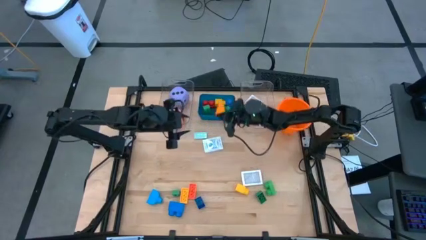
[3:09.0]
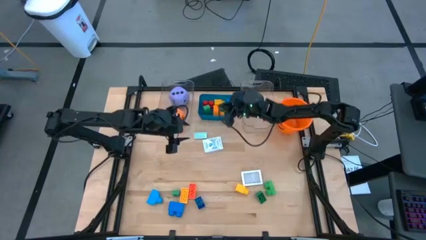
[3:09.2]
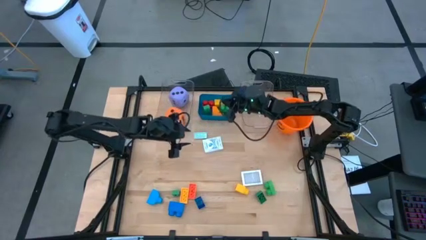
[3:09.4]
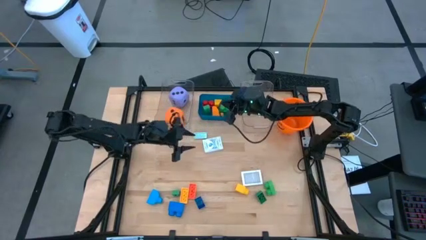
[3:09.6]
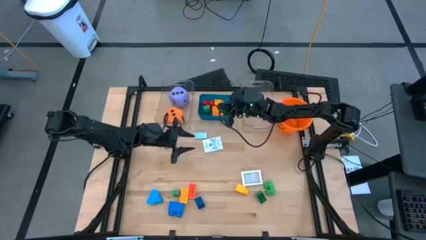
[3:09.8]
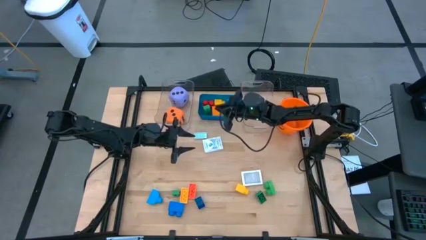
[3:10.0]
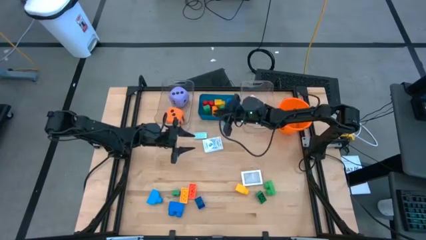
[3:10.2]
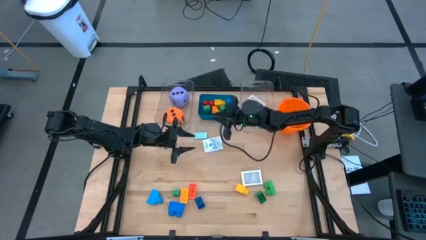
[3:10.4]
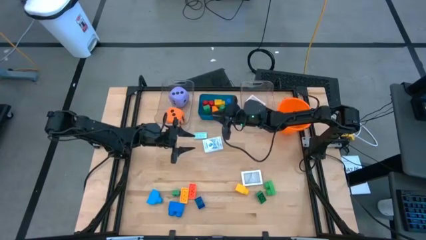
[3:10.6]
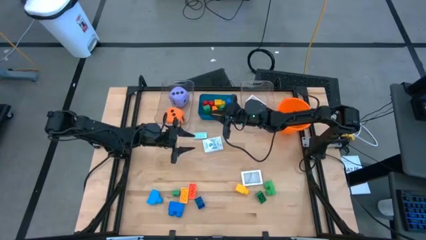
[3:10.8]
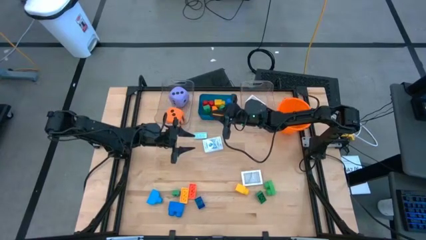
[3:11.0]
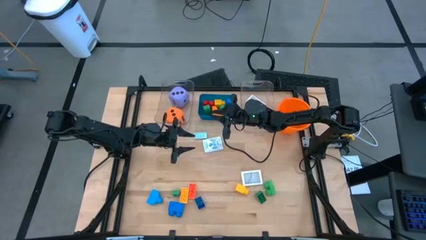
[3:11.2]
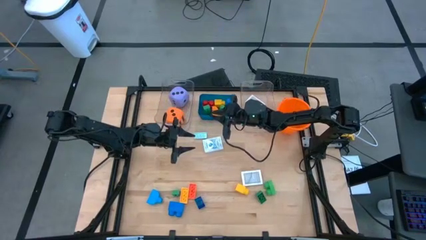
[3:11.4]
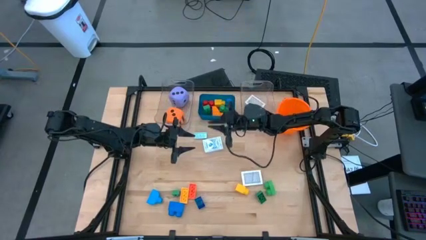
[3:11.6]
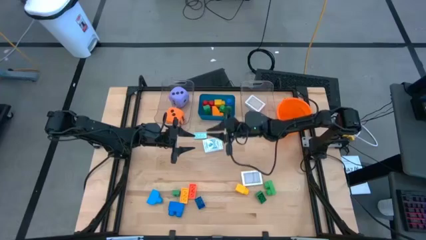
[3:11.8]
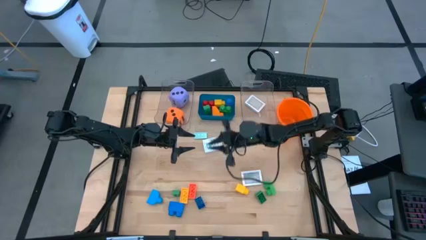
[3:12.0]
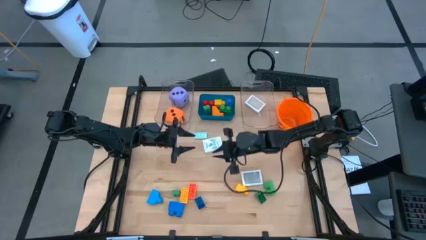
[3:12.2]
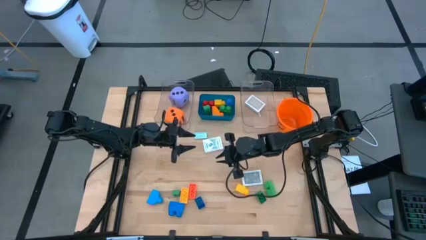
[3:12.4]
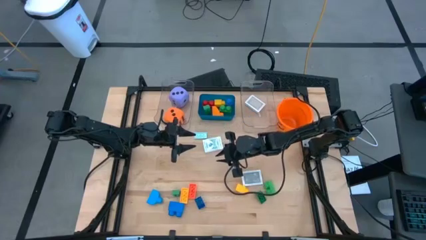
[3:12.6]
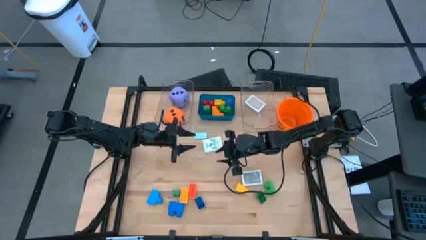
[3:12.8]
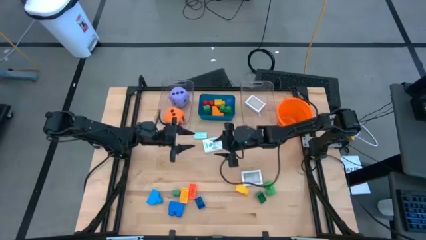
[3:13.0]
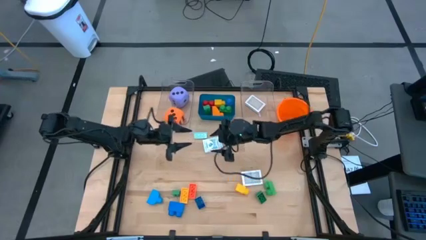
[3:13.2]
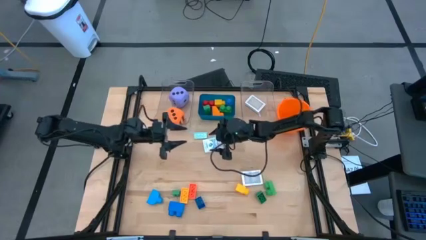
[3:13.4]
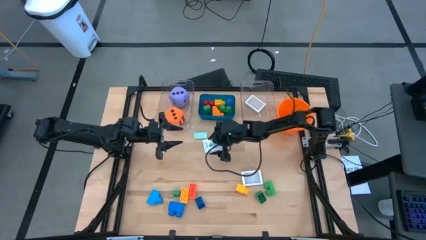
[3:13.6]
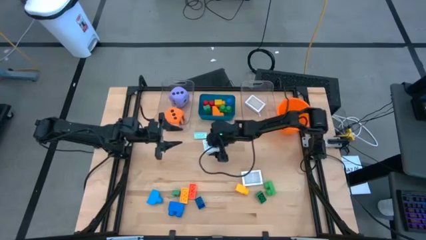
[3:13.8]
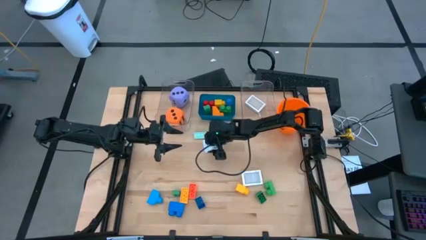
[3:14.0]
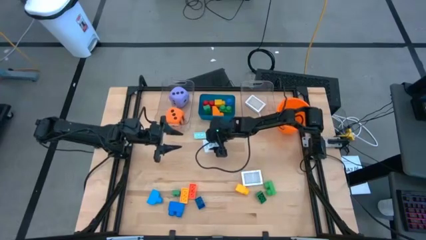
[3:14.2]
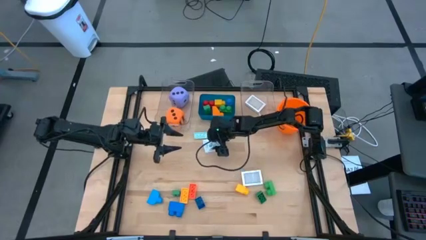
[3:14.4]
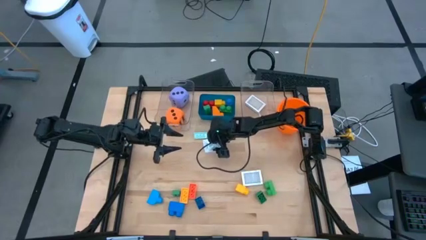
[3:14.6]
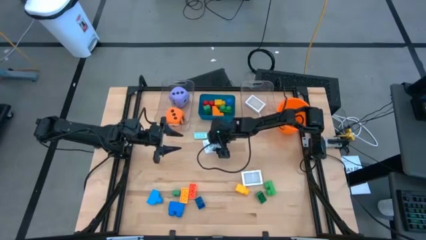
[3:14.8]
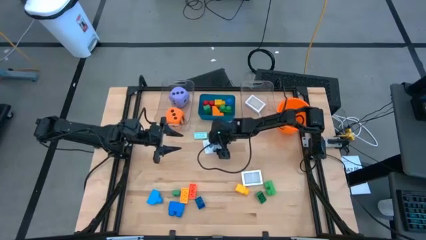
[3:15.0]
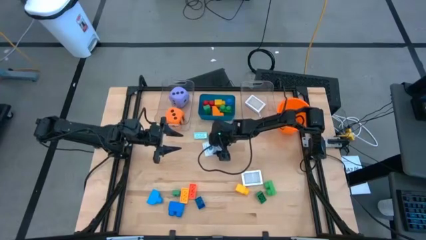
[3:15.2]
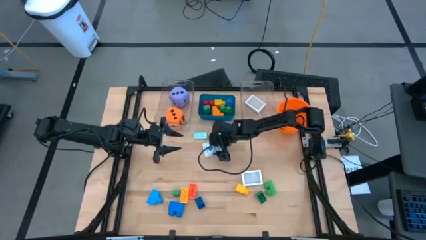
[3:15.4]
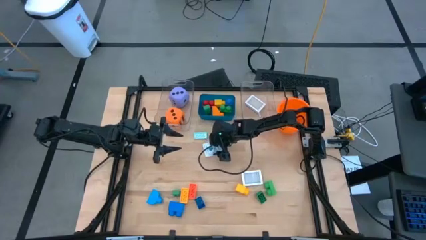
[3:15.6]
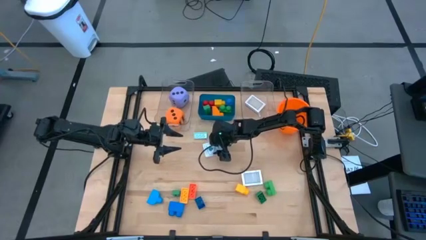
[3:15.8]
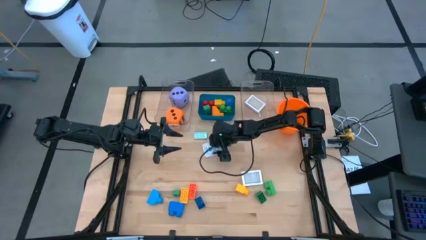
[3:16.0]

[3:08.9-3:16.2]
Task: Pick & Place Toys
Put the blue deck of cards into the right transparent bin

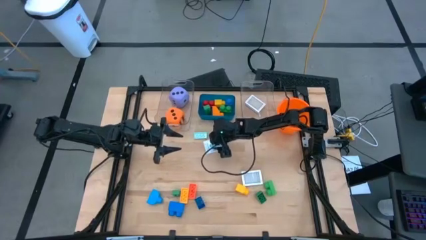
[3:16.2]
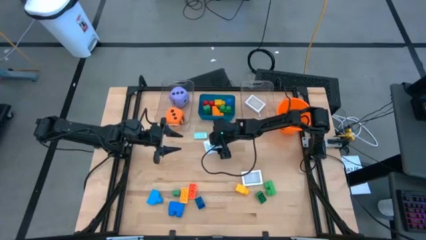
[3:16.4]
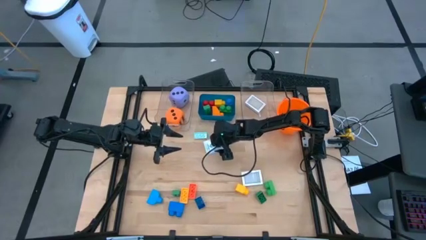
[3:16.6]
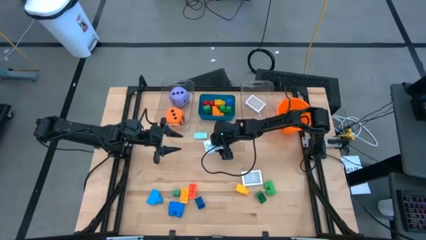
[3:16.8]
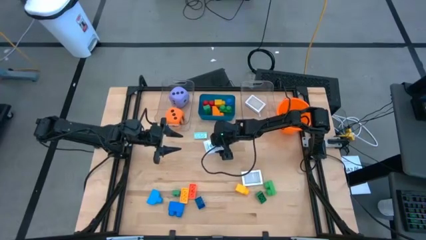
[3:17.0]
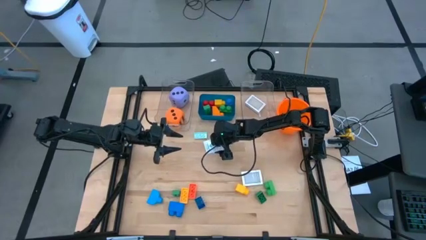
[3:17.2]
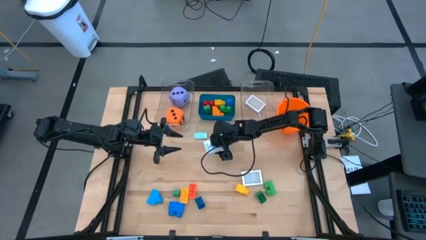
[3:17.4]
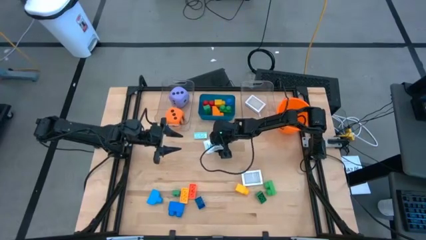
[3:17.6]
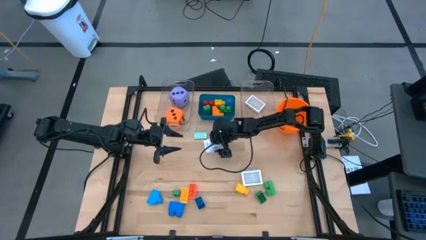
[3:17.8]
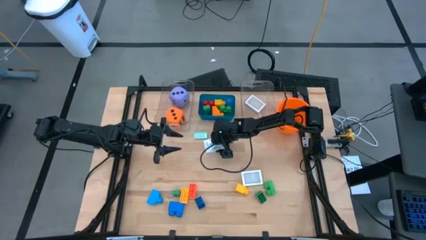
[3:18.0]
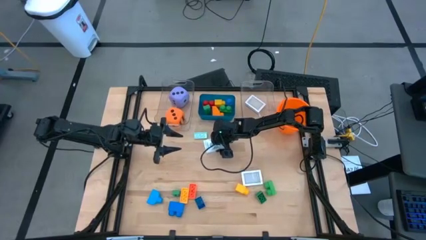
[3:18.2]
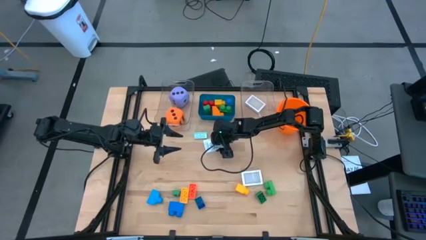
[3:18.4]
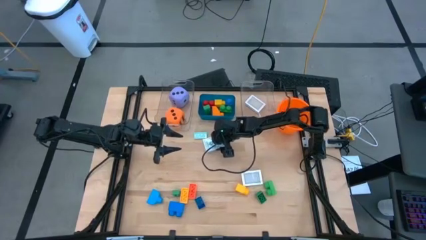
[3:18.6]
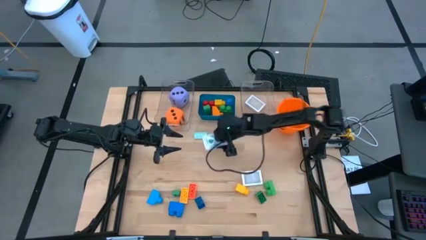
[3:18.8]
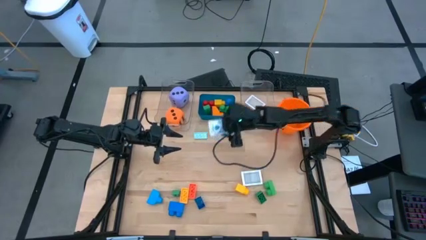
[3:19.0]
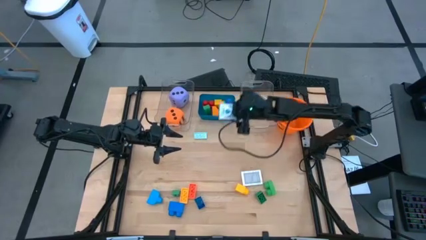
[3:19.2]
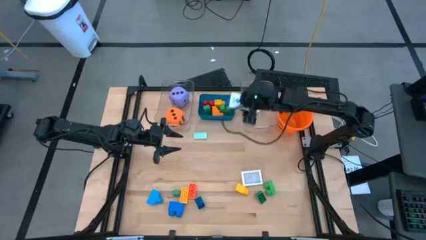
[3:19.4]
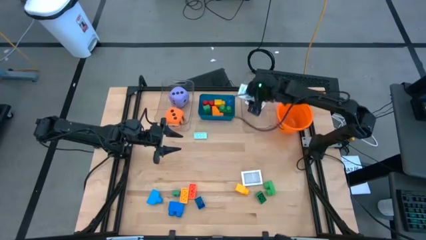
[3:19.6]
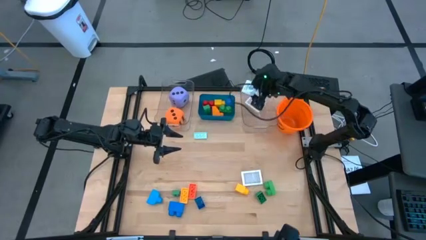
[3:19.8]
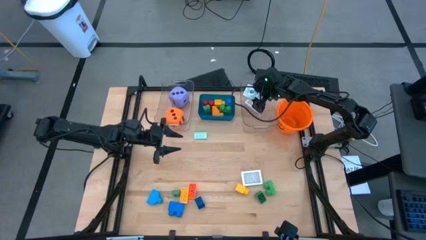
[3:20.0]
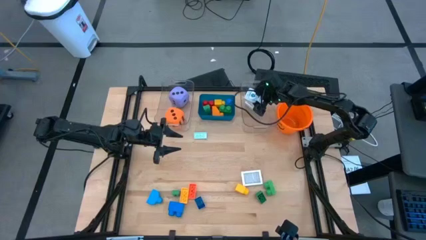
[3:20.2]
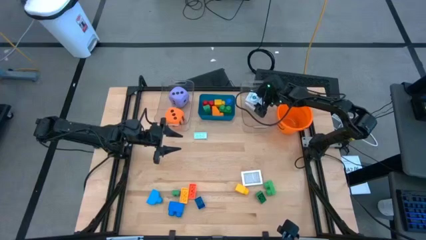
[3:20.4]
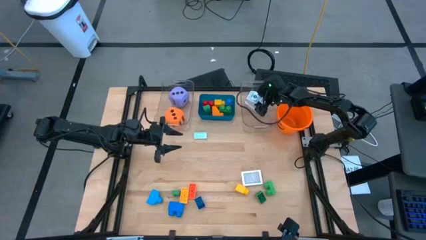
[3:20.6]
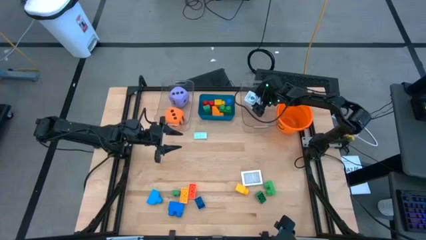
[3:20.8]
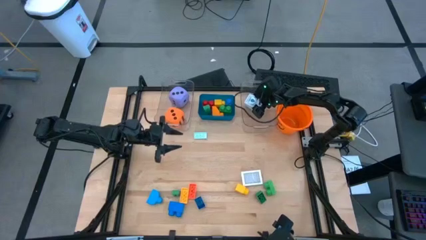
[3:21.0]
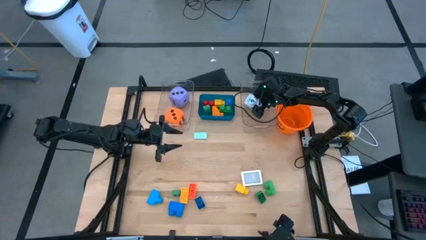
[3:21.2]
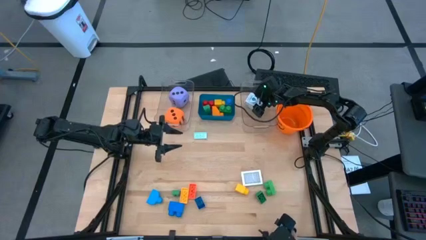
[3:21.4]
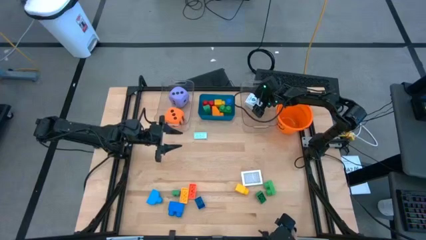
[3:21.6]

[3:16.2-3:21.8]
Put the blue deck of cards into the right transparent bin

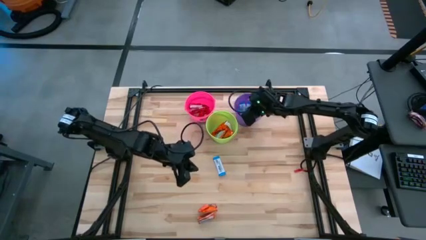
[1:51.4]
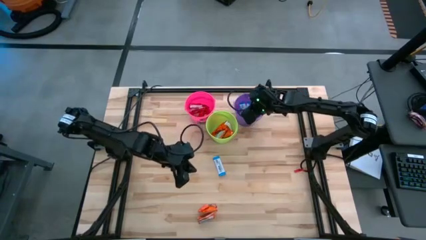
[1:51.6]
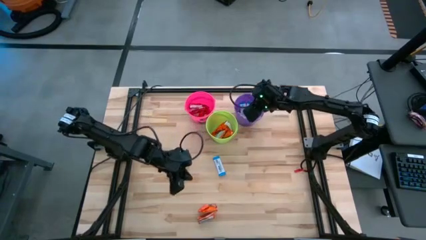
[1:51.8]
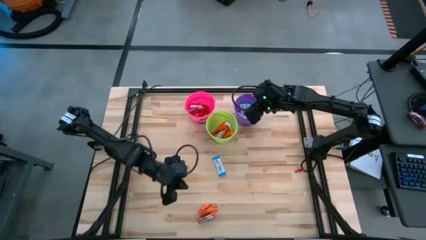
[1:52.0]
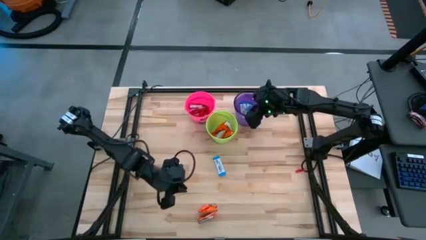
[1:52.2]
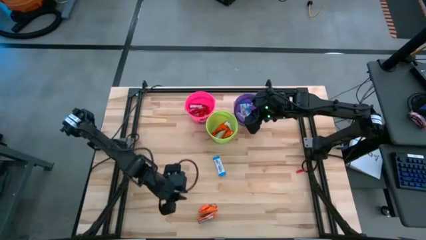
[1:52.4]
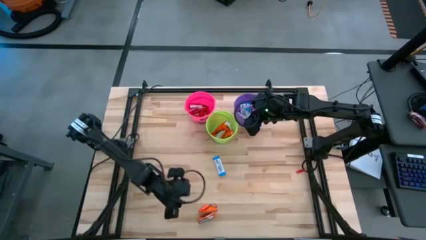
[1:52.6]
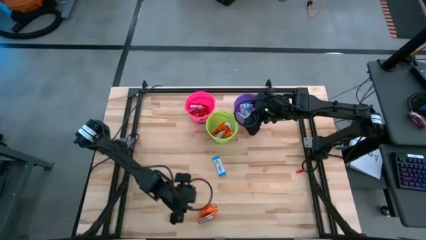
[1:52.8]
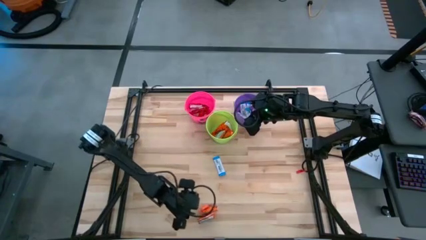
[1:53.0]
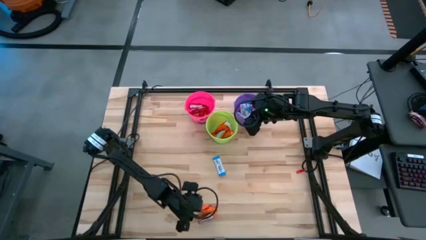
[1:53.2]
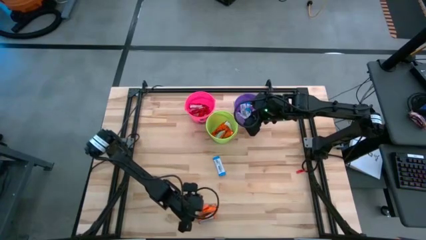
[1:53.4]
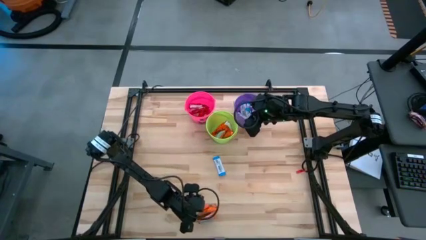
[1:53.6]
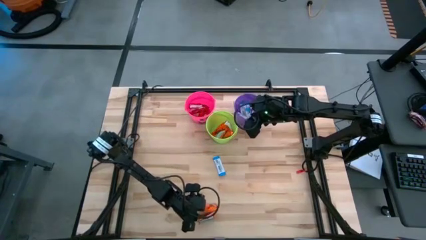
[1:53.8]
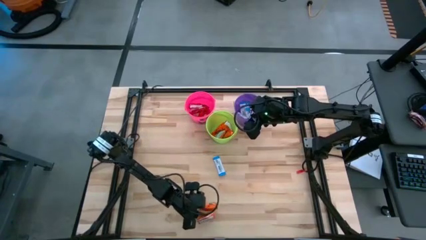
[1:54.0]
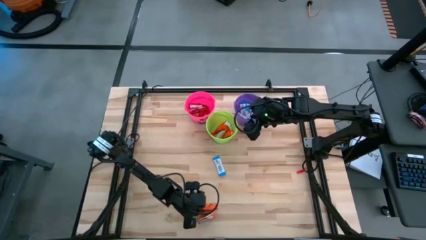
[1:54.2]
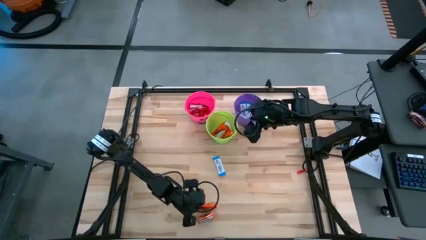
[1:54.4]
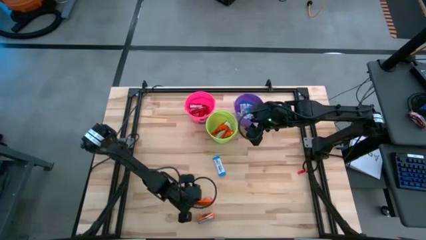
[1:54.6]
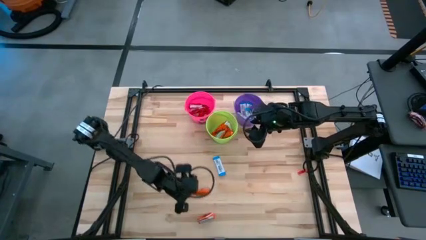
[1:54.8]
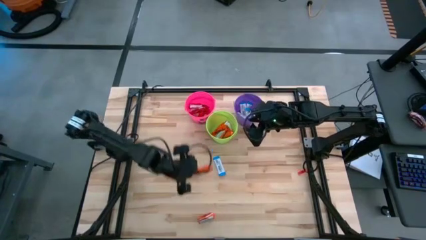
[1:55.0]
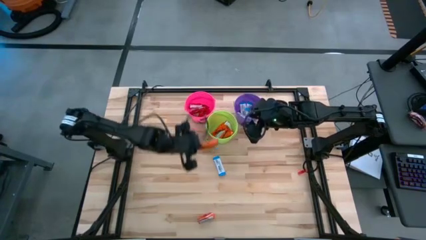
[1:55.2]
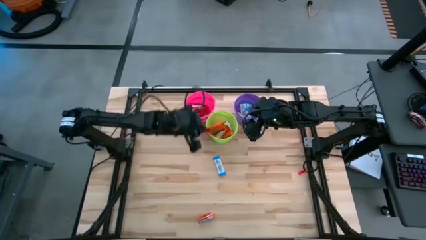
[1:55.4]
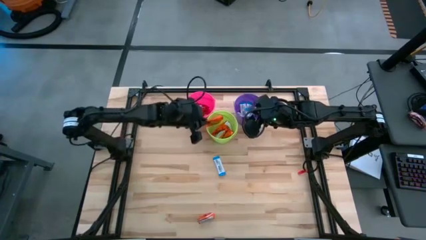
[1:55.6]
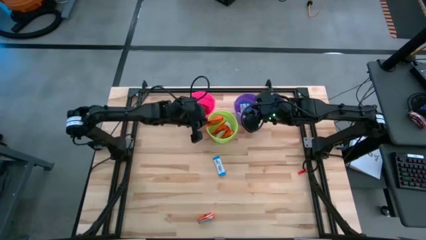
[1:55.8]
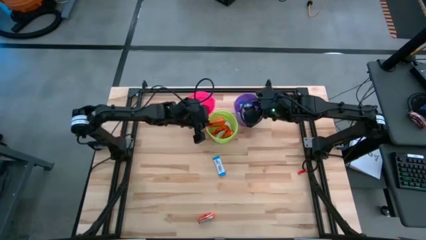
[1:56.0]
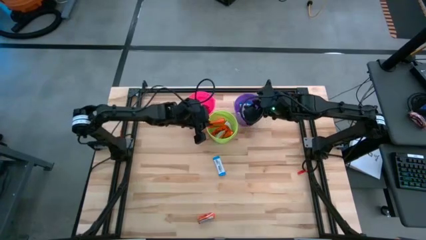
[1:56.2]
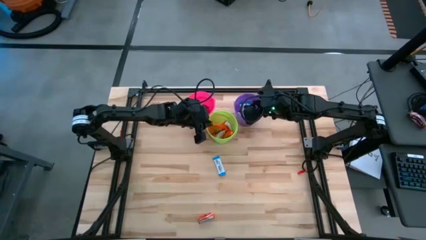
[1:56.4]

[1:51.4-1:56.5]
Task: Sort candy
Put the orange candy into the green bin
